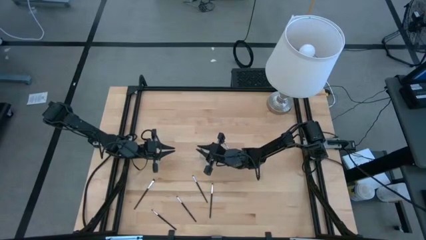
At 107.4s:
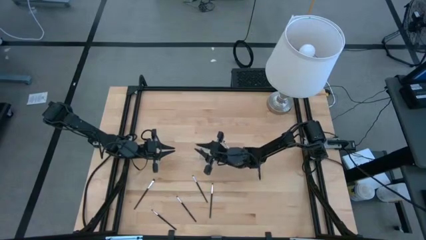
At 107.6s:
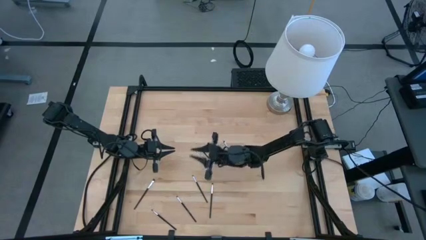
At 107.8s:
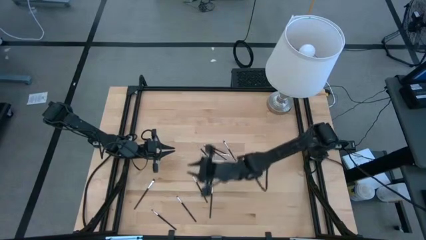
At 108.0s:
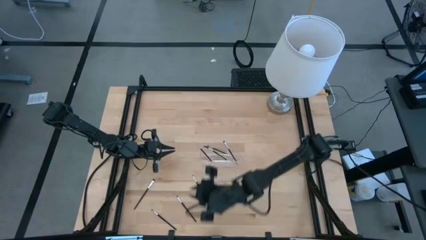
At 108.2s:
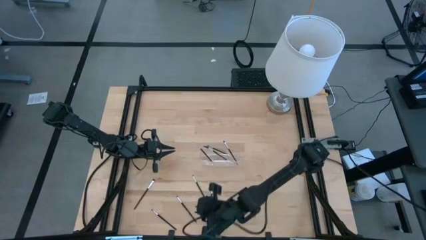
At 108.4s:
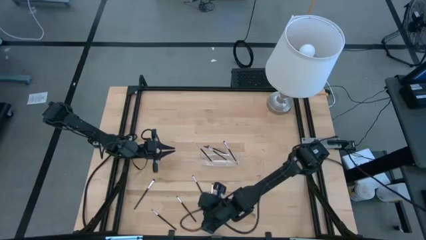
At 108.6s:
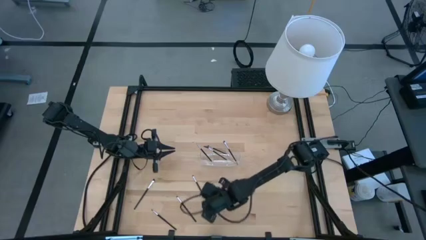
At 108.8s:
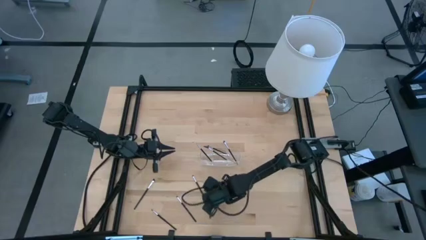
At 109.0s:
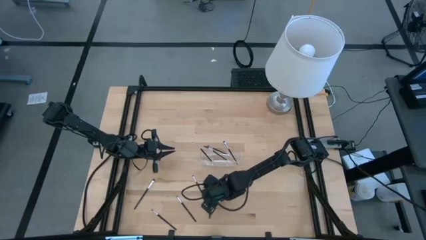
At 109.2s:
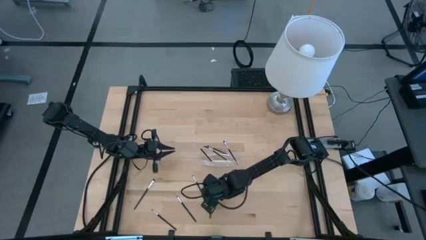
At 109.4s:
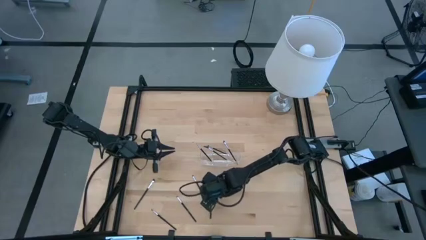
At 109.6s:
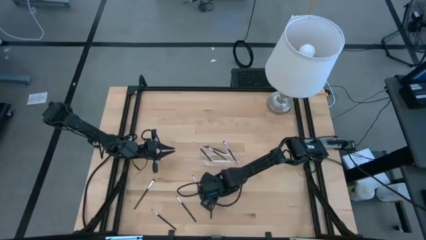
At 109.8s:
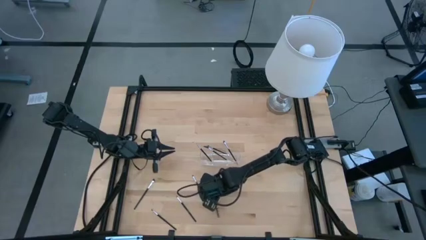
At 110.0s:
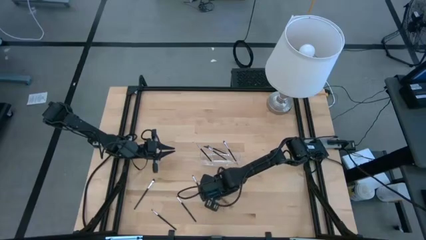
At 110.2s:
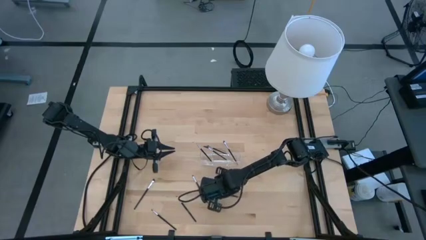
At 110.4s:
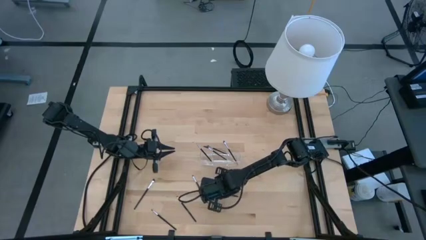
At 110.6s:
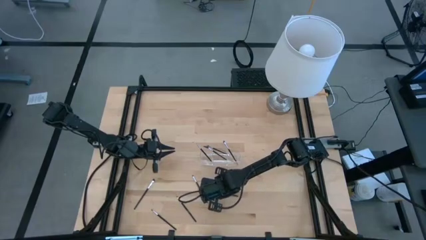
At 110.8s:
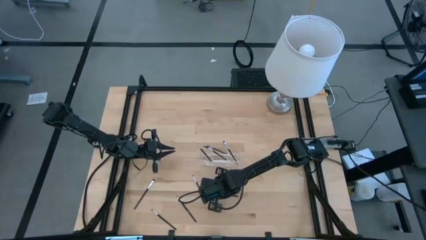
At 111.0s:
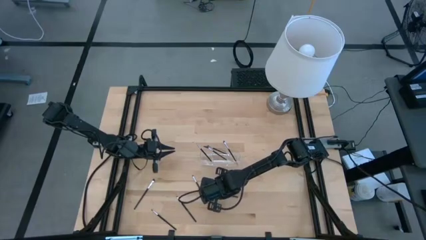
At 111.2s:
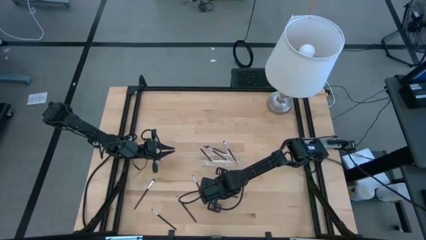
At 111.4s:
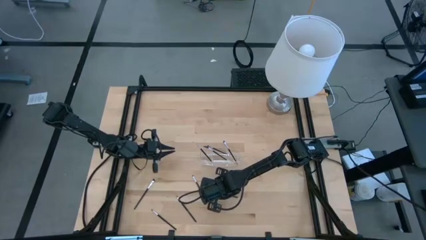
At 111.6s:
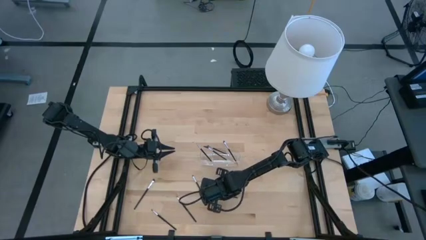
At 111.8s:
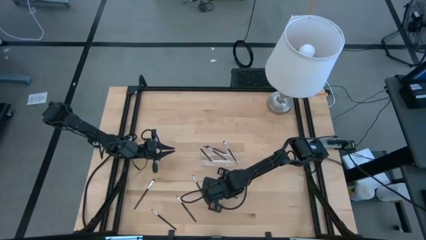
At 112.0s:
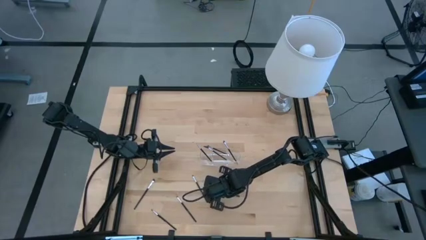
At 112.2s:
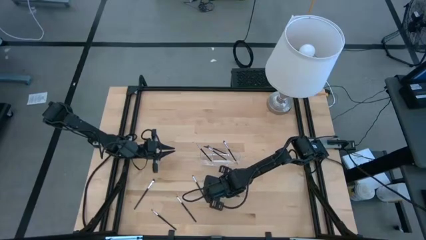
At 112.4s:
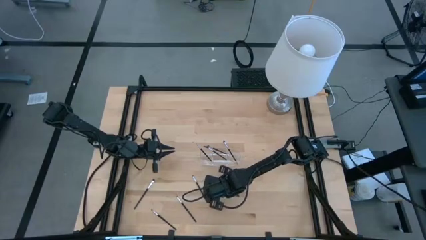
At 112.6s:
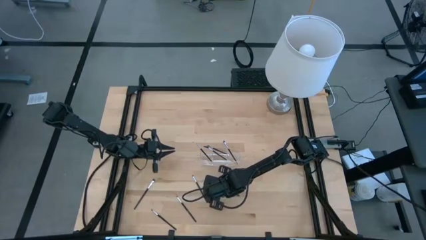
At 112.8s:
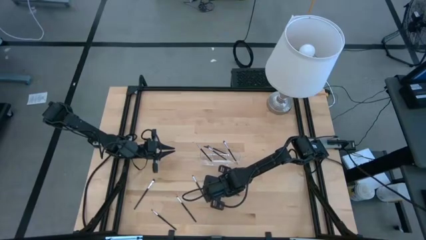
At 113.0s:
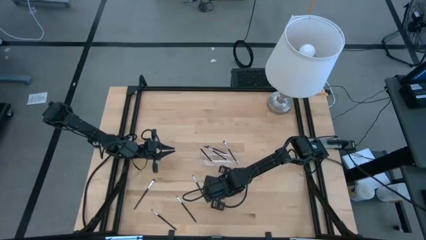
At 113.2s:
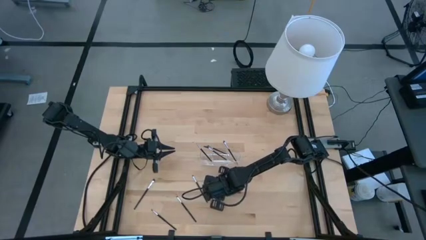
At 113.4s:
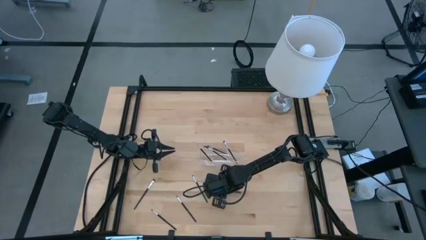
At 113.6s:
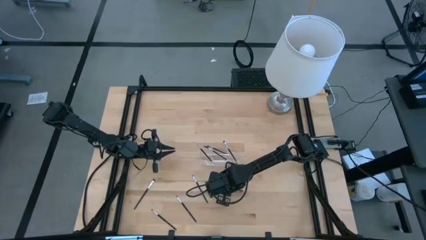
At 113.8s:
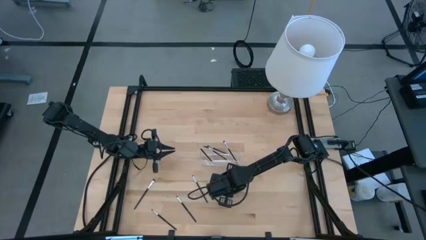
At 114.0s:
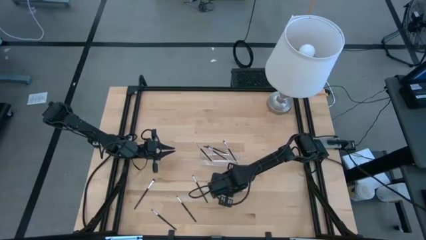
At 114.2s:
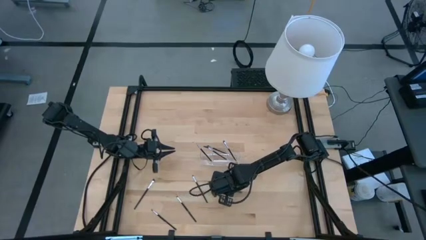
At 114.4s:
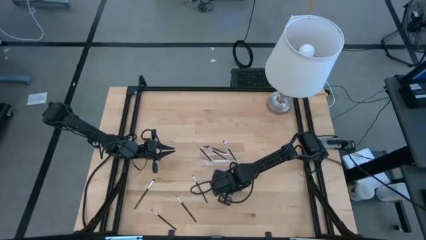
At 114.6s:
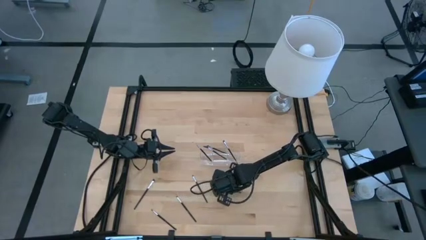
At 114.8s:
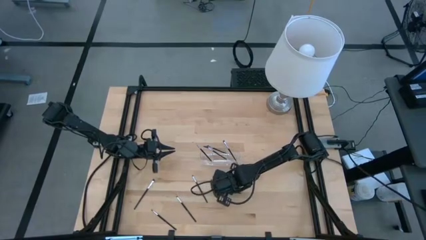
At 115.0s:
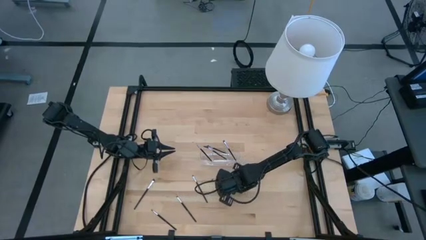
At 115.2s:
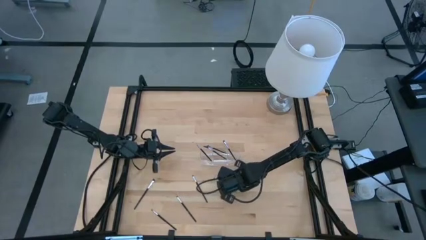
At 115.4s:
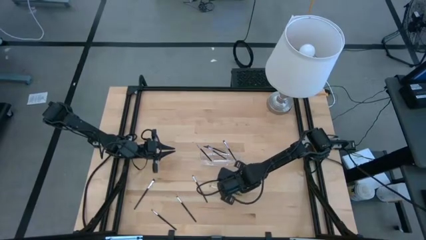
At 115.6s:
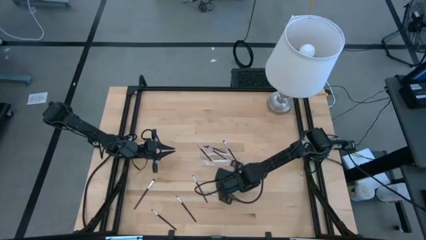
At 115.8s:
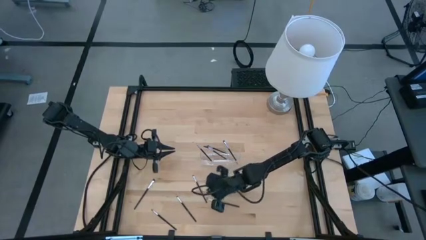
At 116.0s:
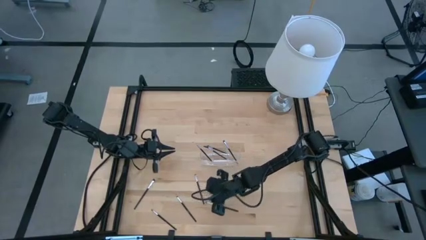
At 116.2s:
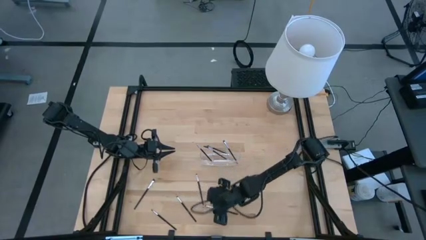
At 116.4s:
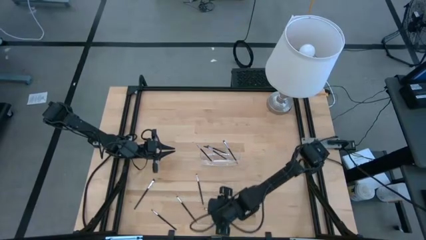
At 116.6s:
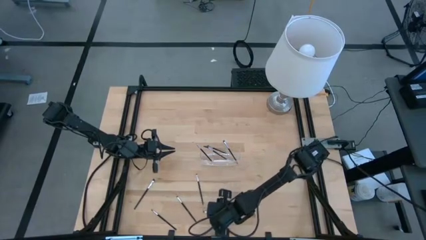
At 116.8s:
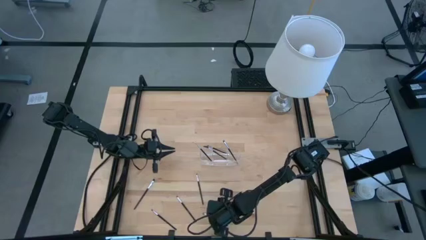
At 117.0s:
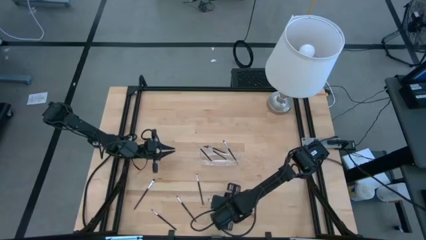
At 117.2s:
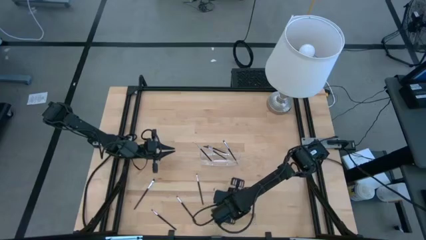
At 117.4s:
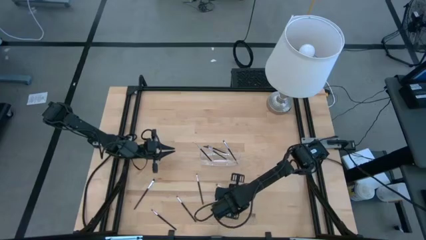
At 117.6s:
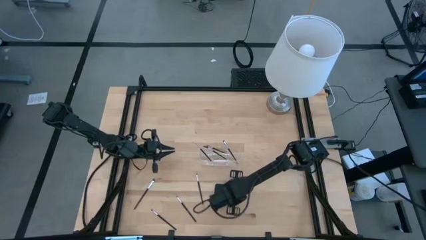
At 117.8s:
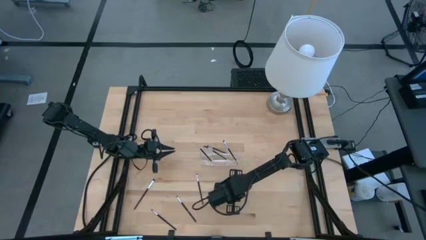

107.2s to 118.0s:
Task: Pick & Place Makeup Supplies
Put the makeup brush into the transparent organizer

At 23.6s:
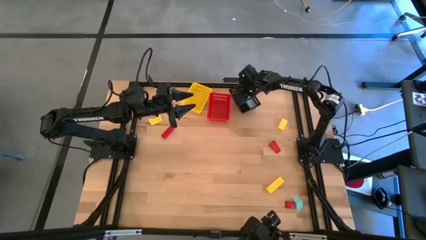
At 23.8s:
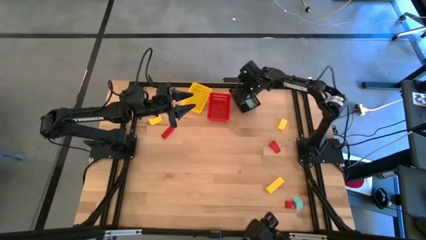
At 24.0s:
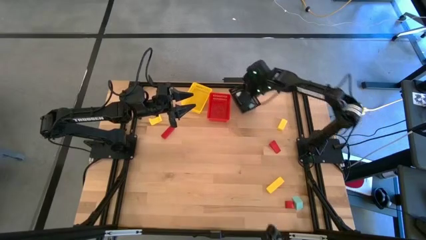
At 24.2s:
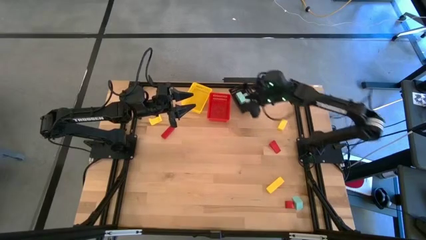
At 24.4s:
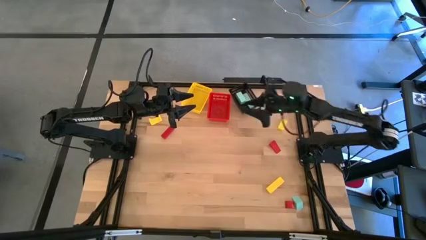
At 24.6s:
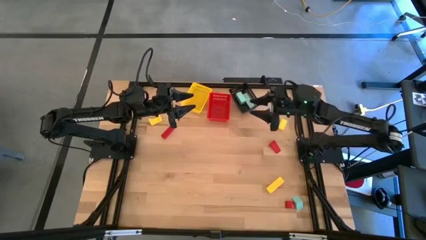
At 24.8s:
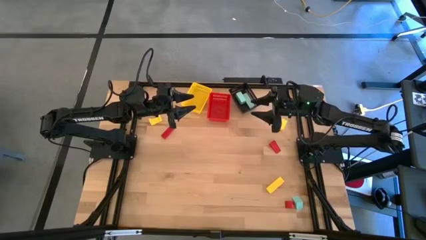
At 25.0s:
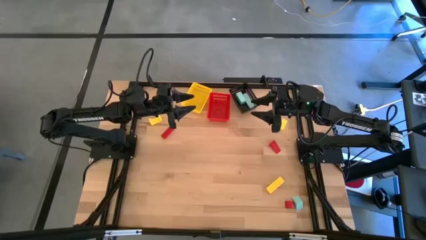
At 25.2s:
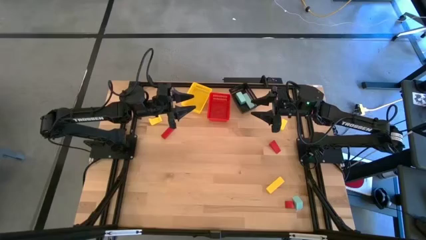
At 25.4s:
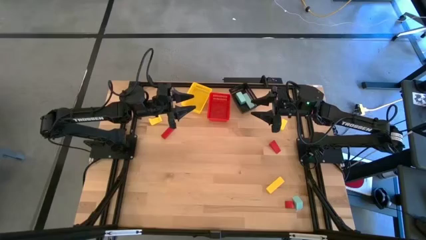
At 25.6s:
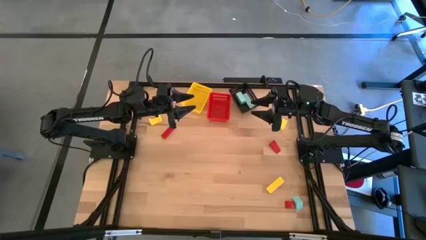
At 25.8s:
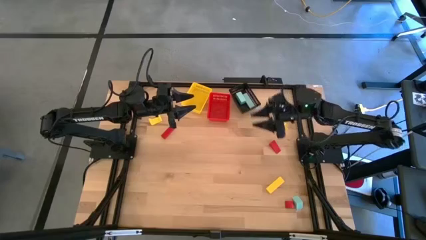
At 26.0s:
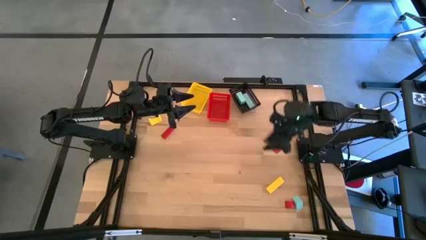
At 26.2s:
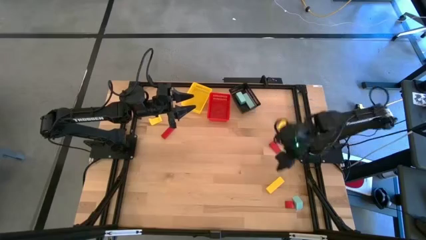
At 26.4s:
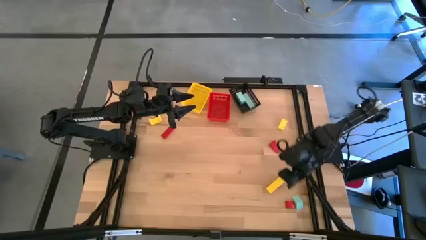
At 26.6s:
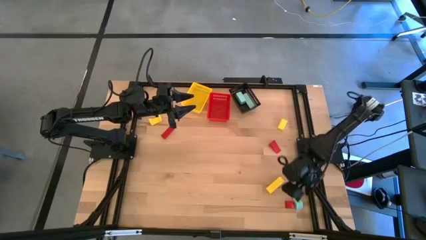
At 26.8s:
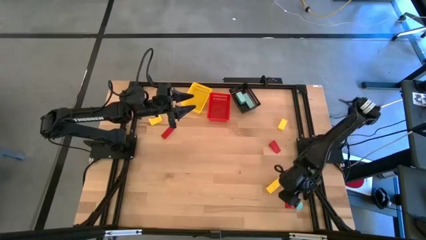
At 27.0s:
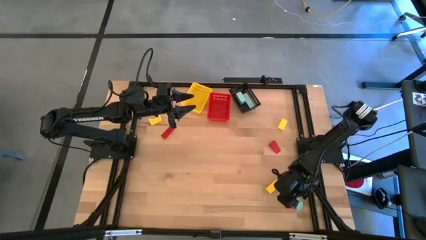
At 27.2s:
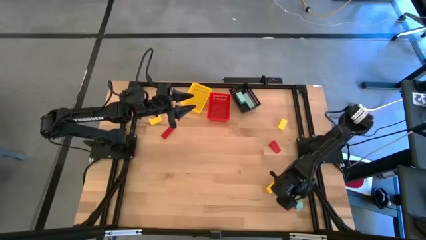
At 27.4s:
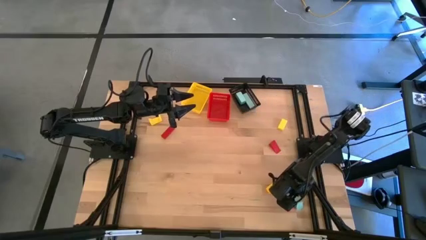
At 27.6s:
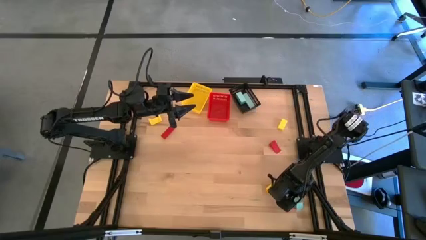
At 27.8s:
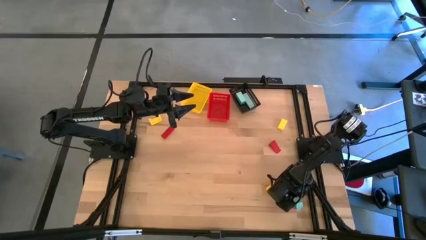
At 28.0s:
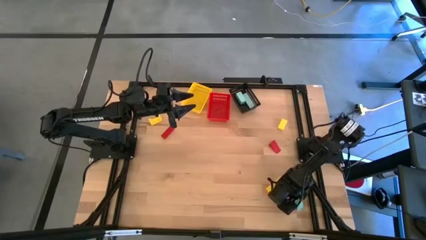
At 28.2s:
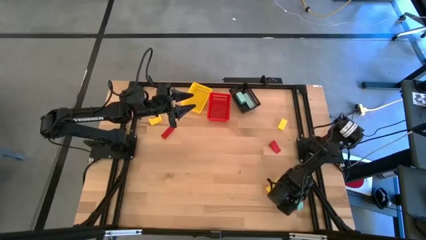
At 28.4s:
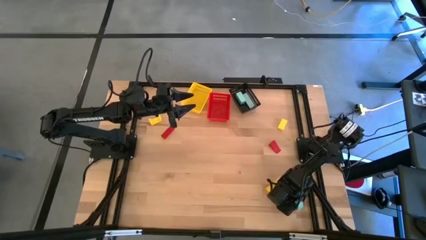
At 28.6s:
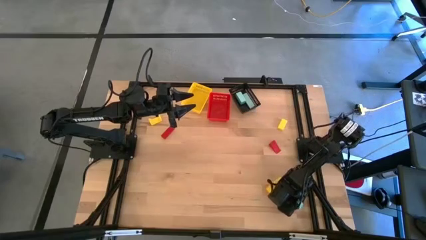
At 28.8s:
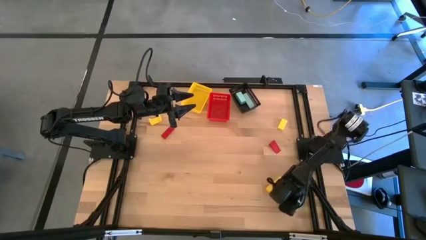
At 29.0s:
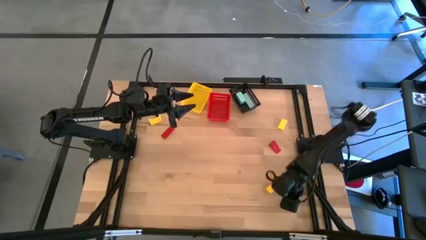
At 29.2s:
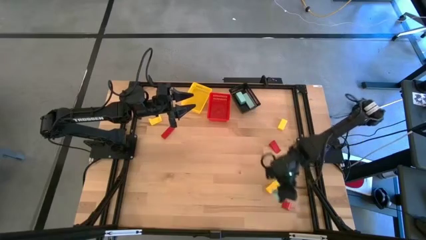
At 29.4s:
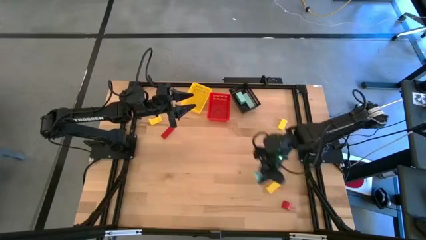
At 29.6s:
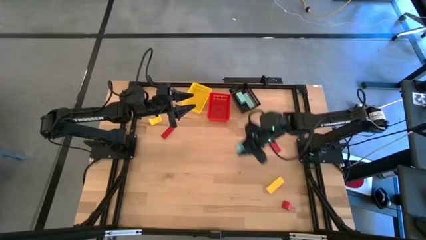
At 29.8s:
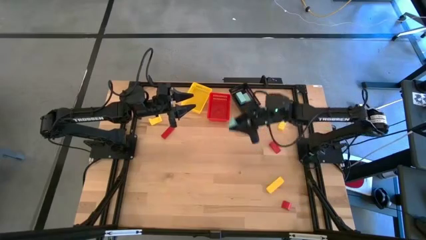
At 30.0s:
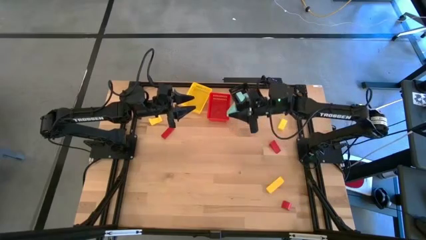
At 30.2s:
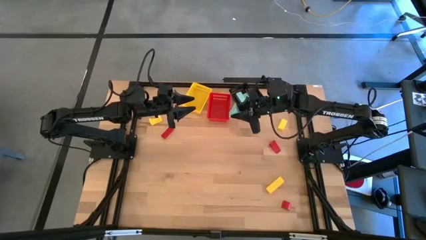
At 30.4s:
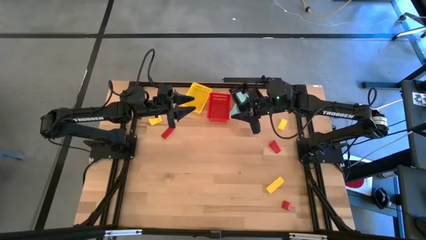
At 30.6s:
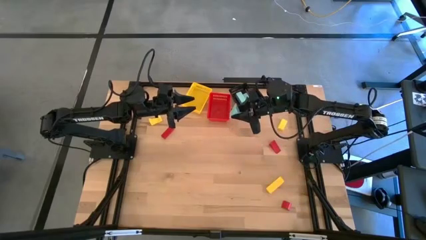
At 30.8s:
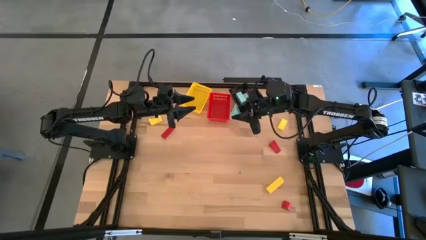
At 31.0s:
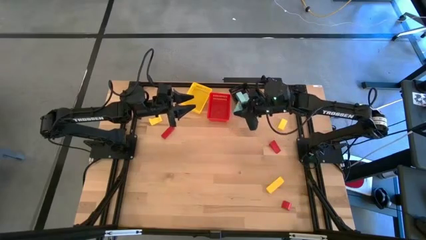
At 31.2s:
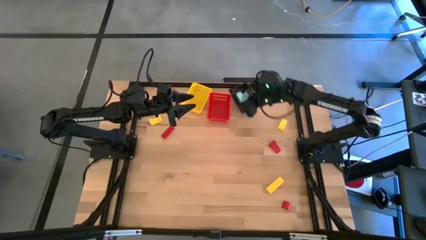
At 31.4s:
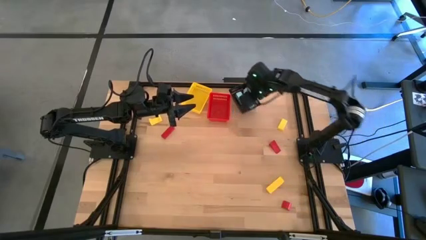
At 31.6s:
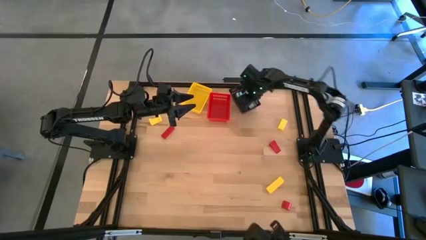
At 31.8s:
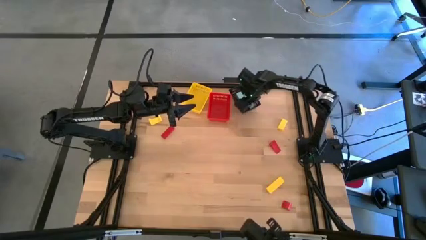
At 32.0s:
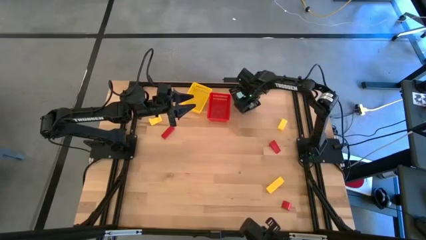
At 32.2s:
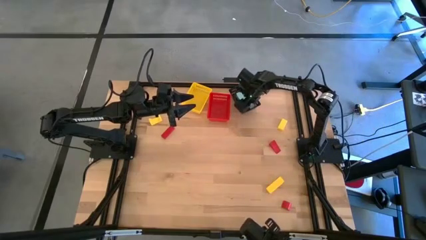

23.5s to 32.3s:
Task: Sort & place blocks by color
Put the blue block into the black bin
